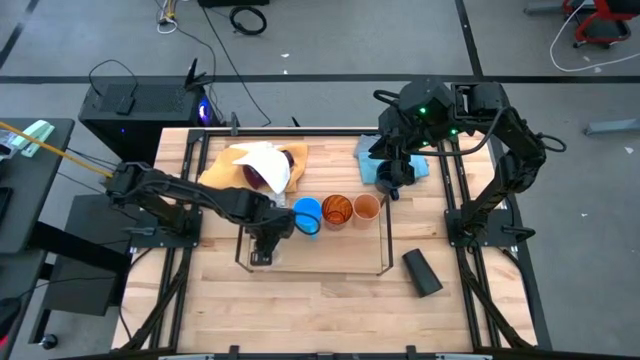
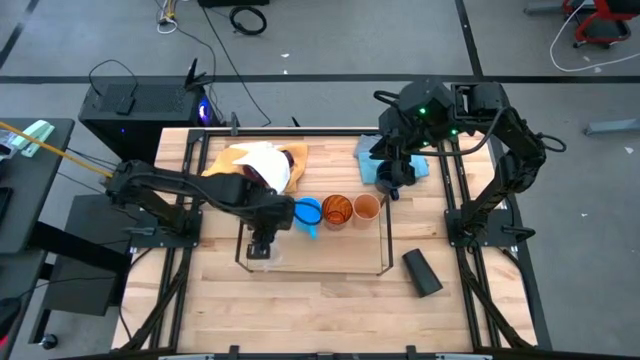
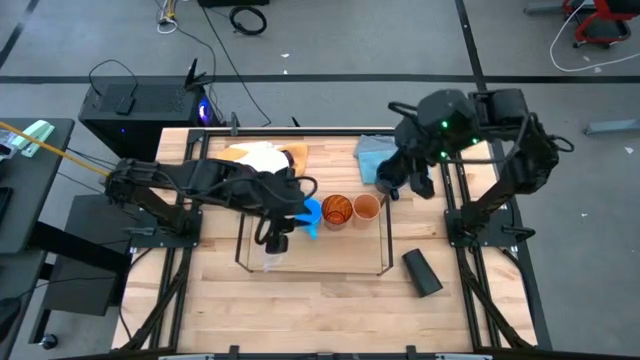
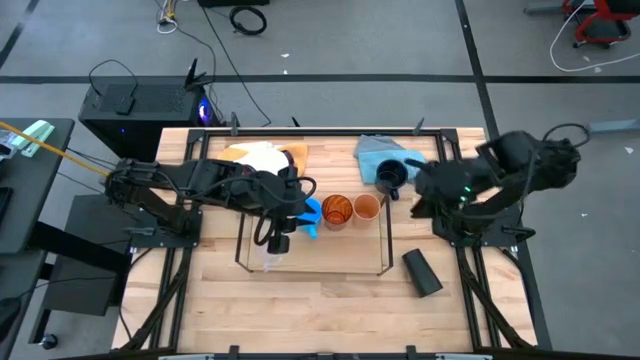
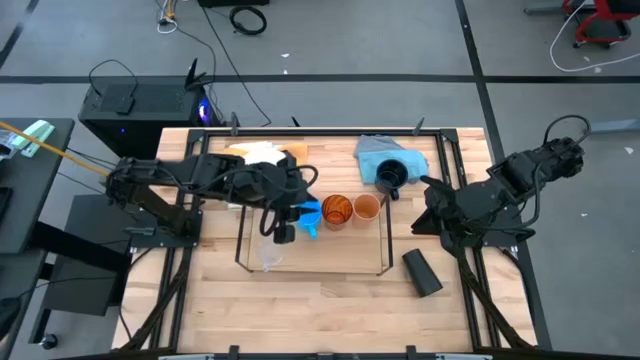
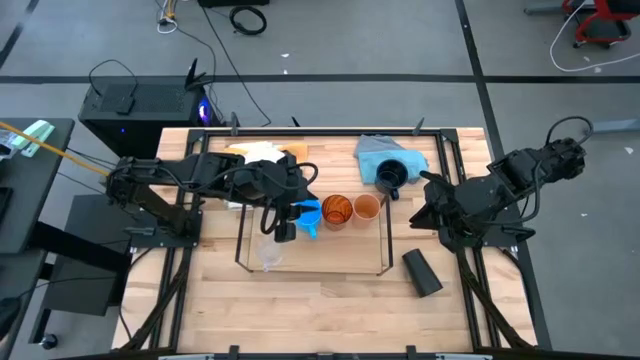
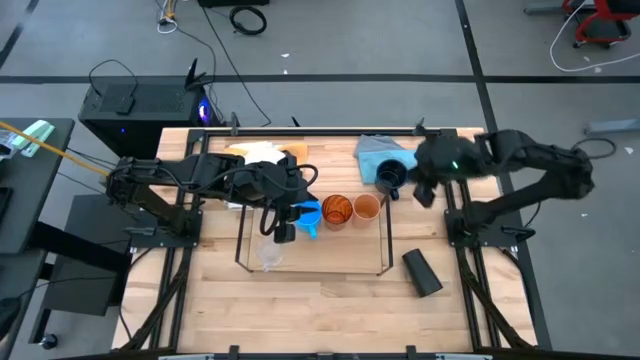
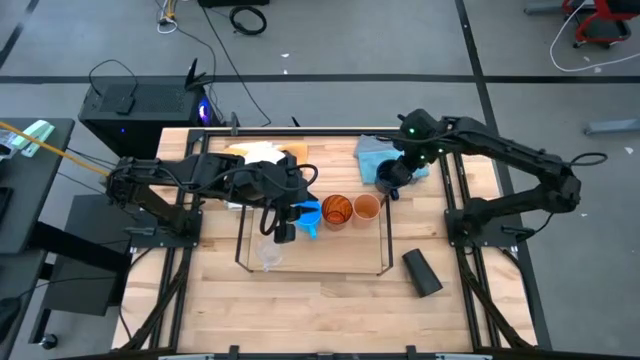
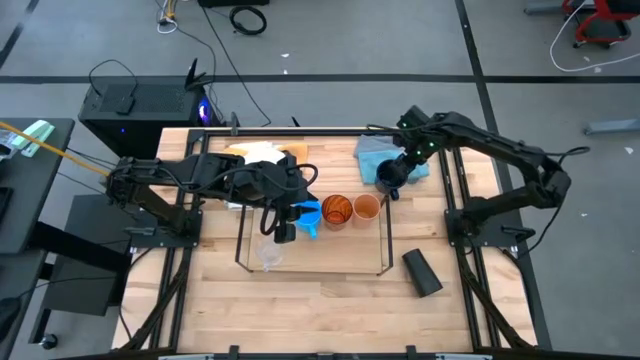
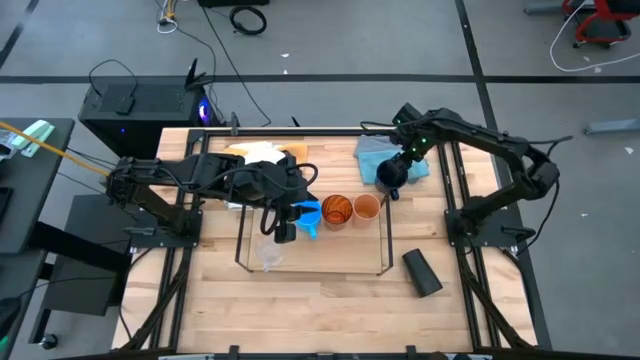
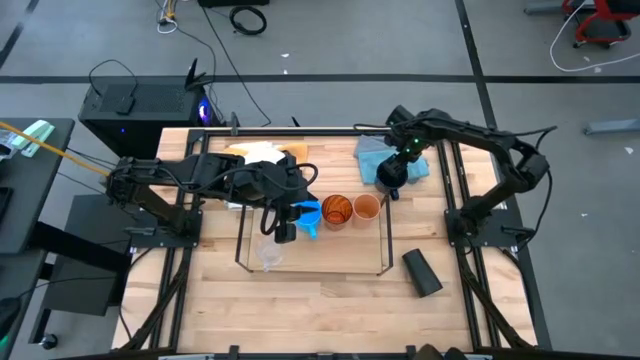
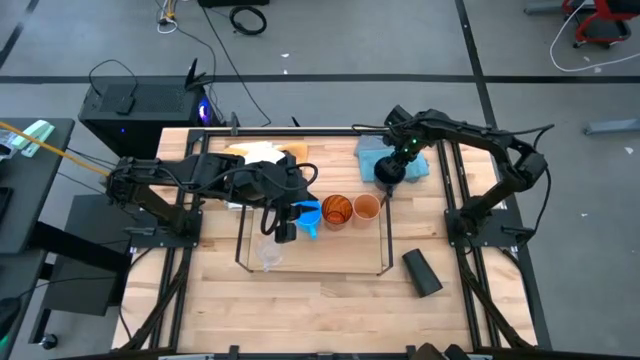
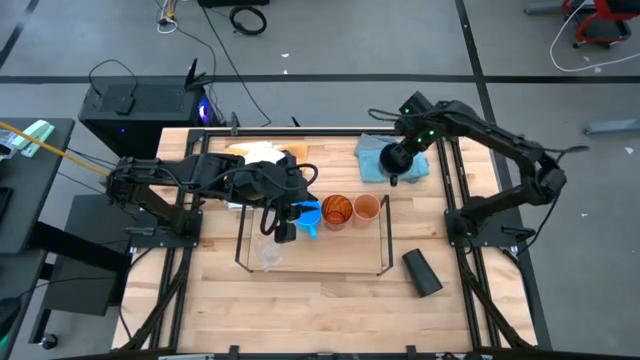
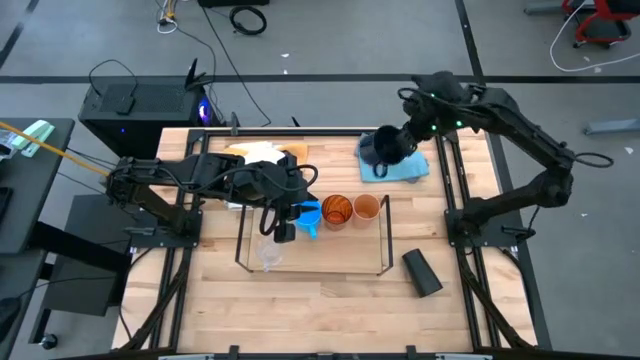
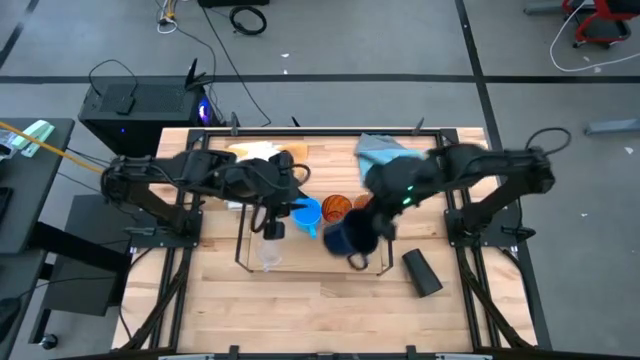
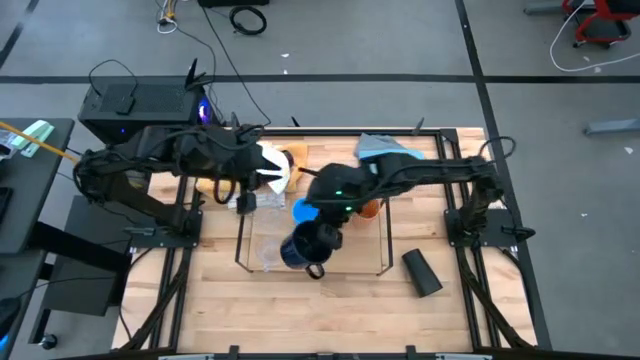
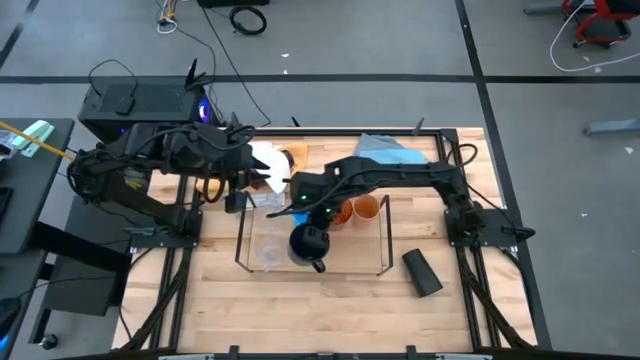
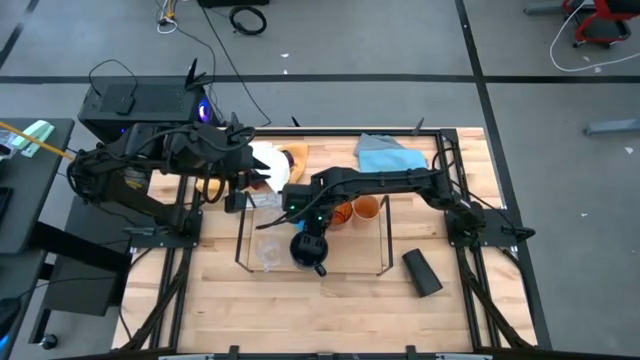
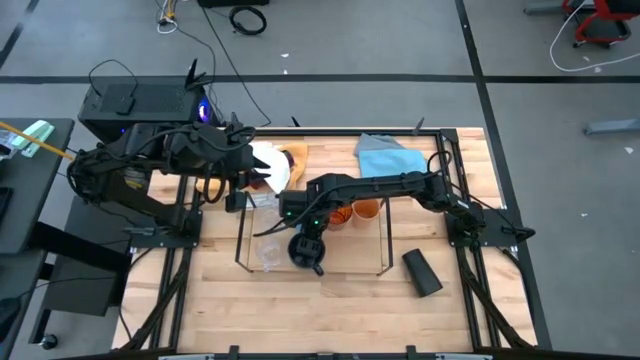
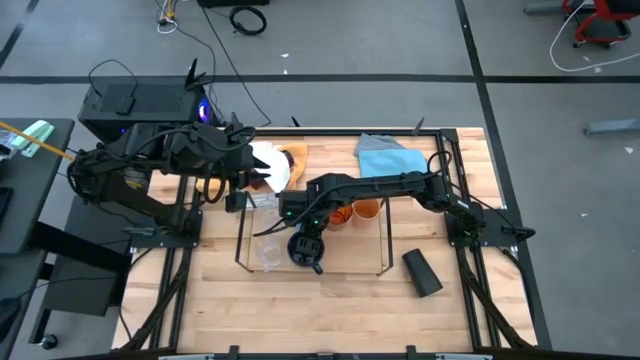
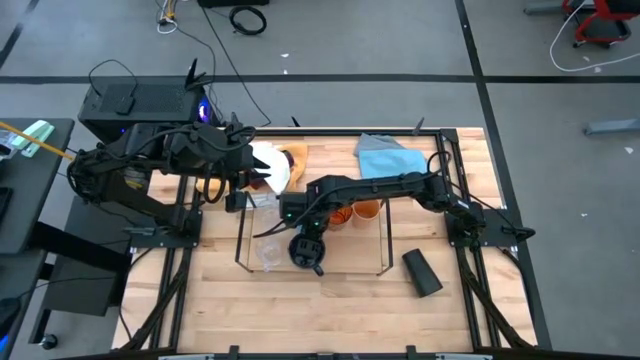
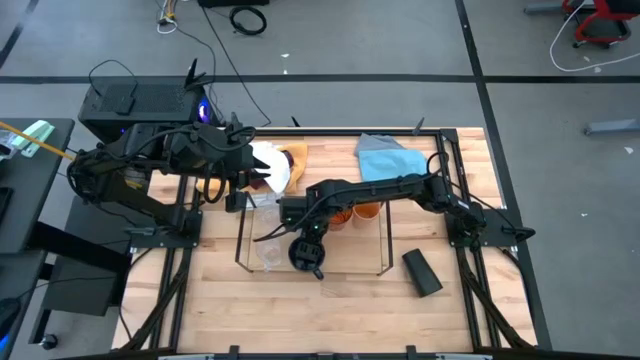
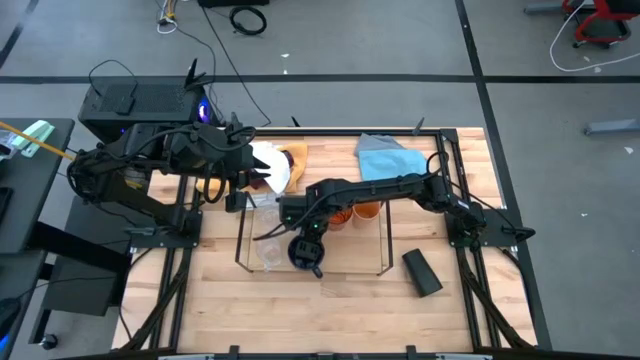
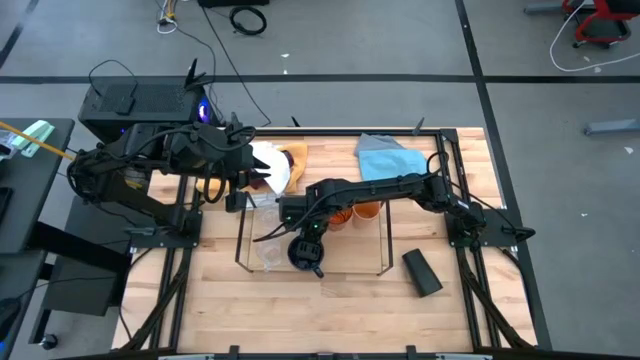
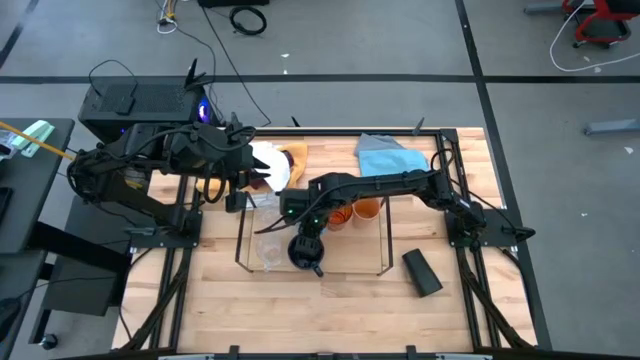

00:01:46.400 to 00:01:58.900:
Task: Stack small to large cups/mugs on shelf
Put the dark blue mug on the shelf

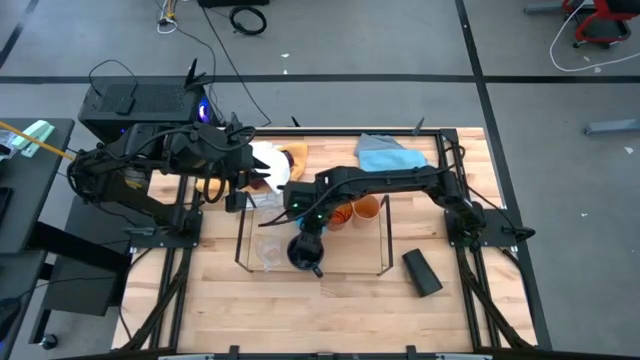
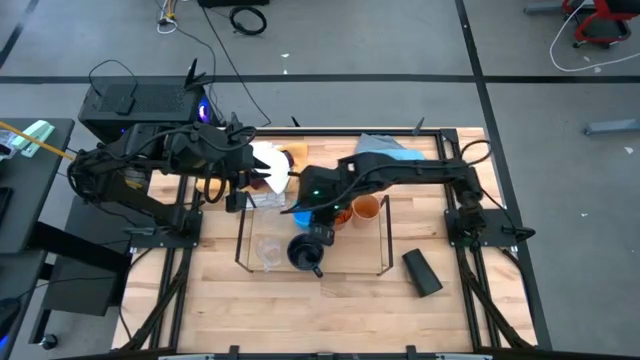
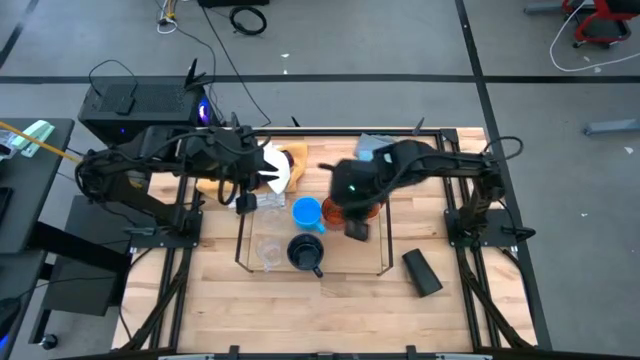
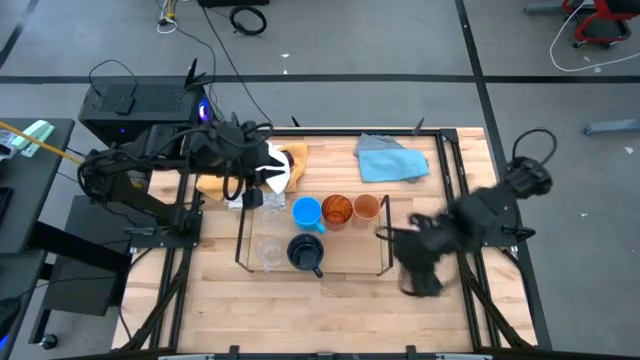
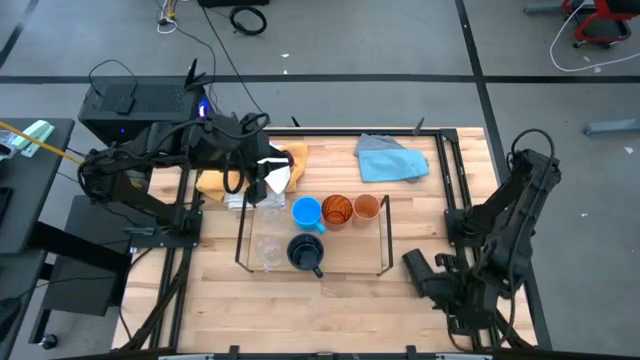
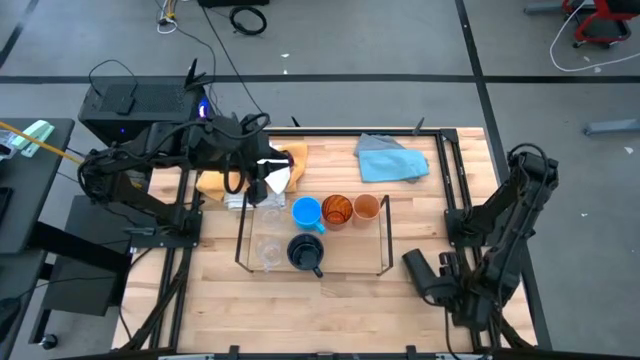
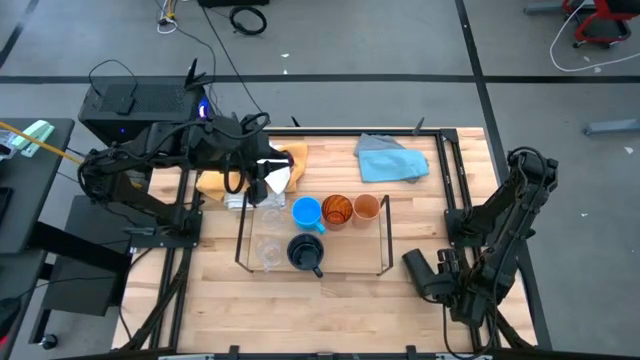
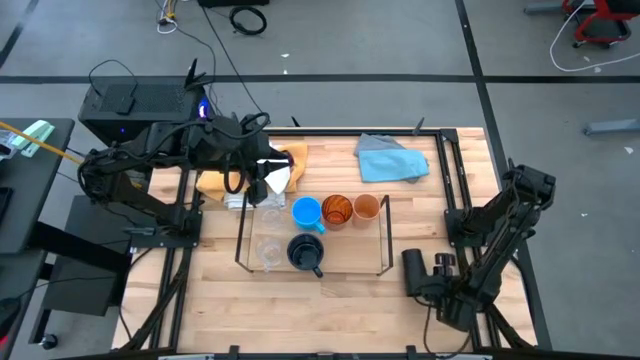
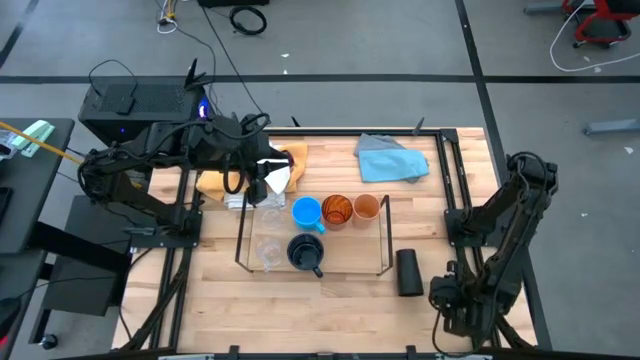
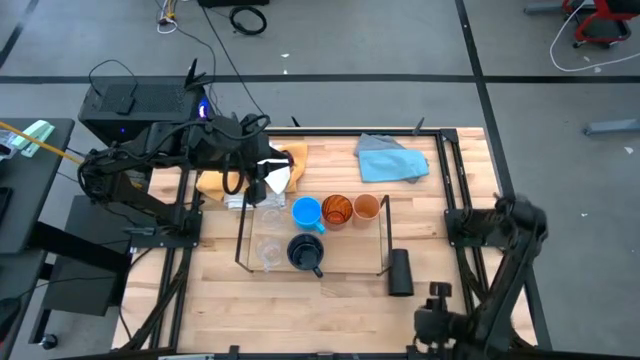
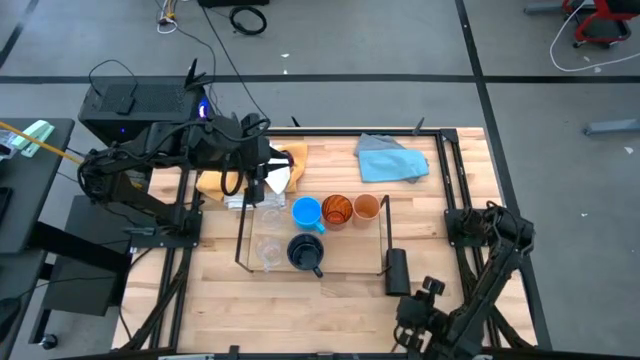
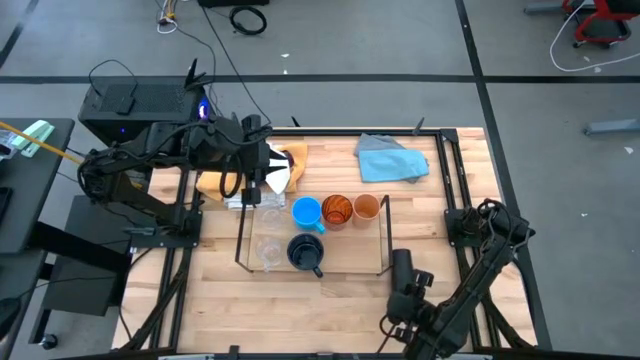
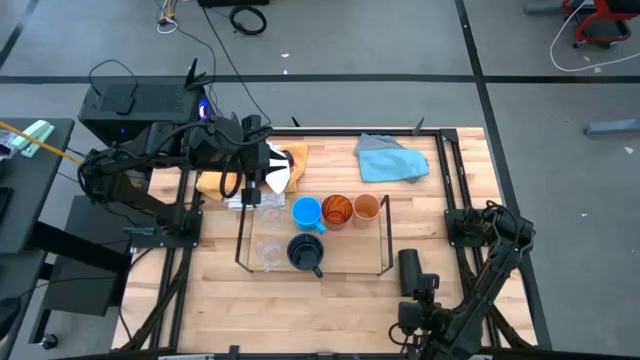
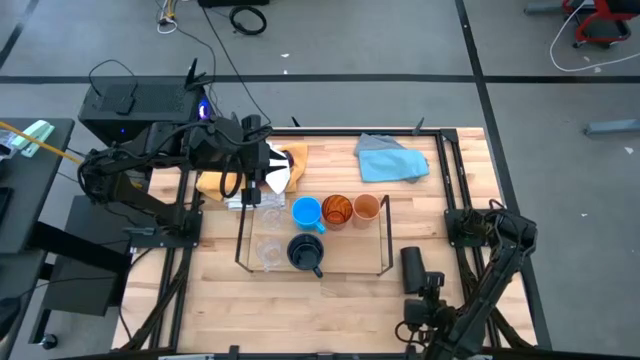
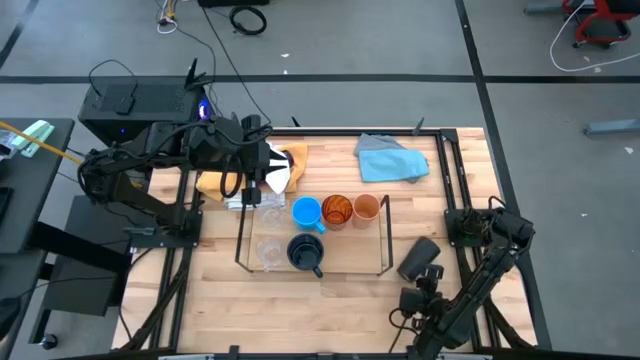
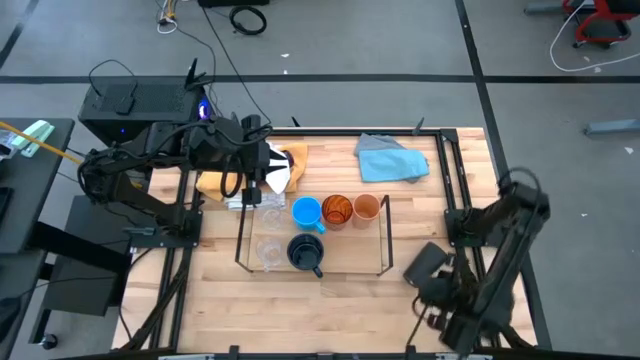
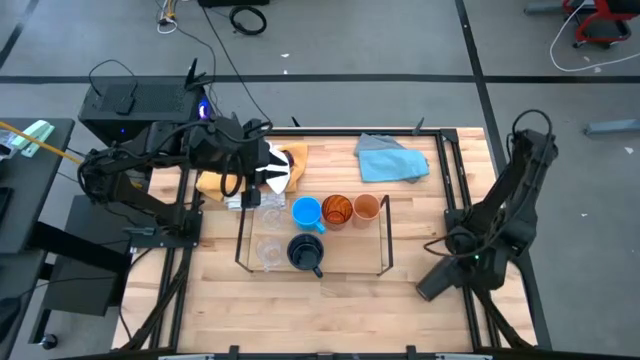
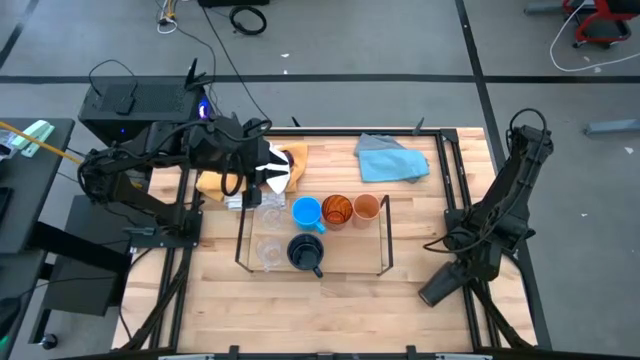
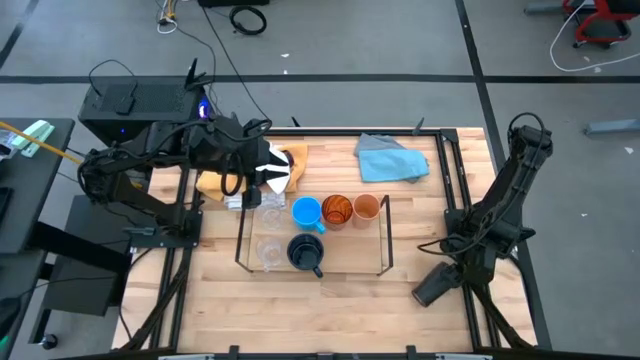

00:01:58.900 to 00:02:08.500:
Put the black cup on the shelf
